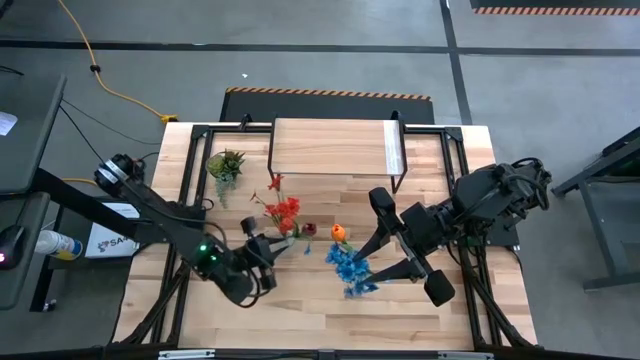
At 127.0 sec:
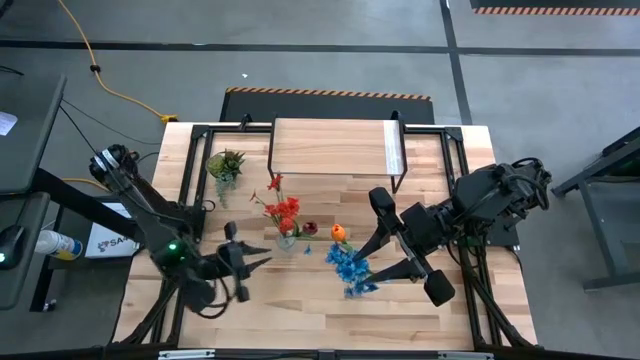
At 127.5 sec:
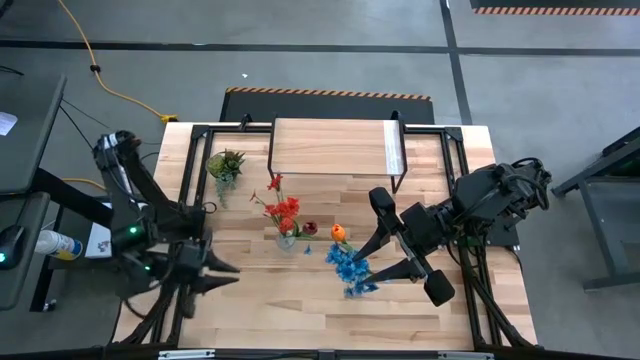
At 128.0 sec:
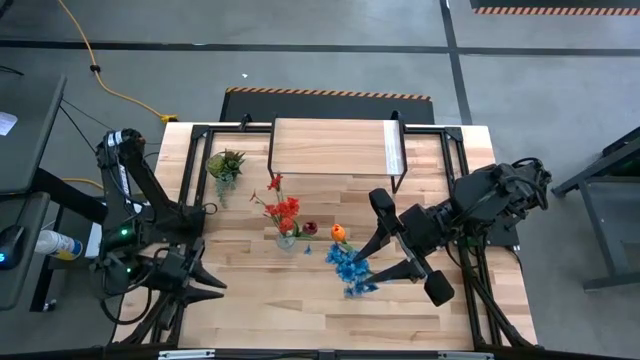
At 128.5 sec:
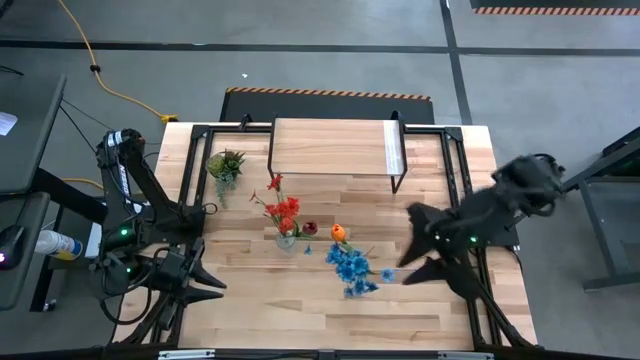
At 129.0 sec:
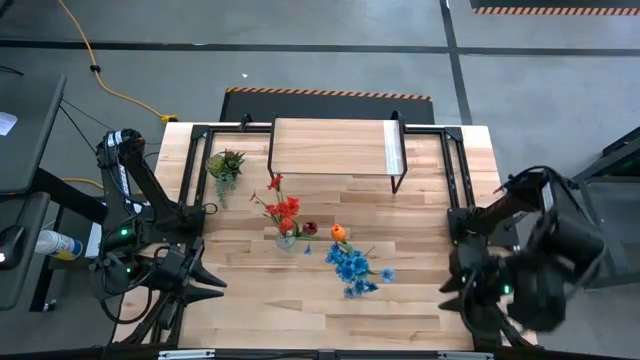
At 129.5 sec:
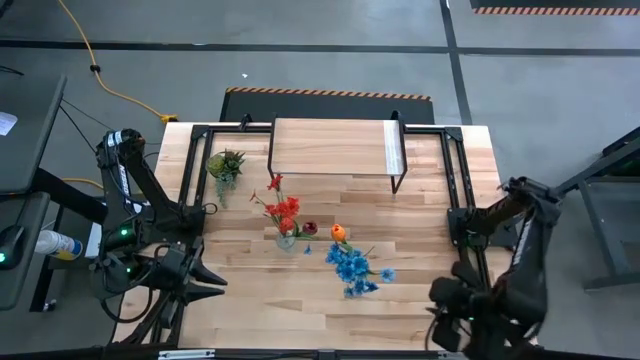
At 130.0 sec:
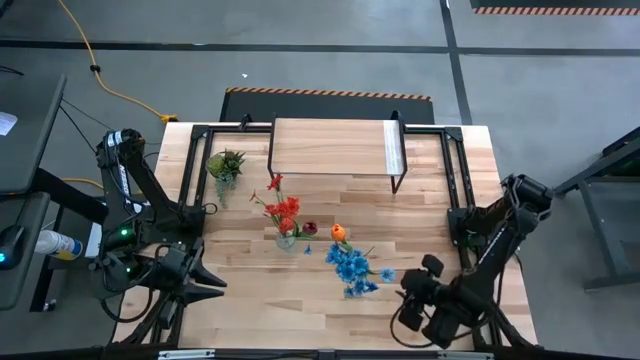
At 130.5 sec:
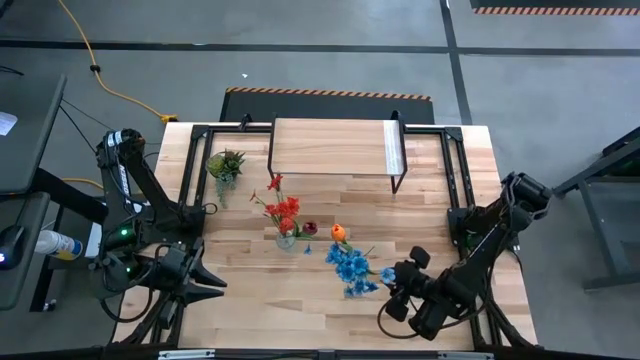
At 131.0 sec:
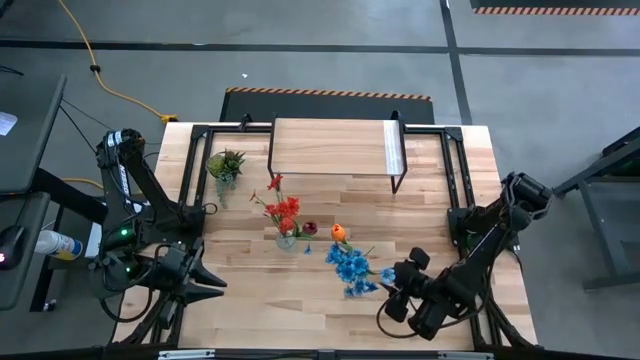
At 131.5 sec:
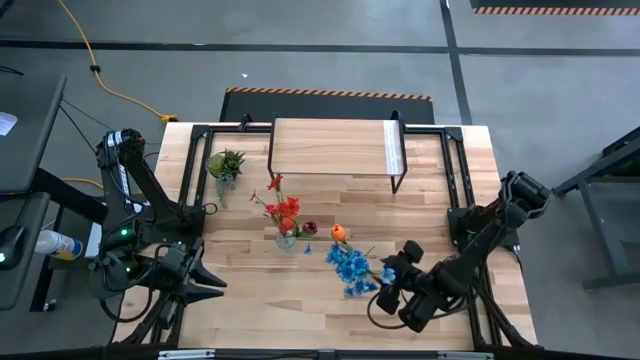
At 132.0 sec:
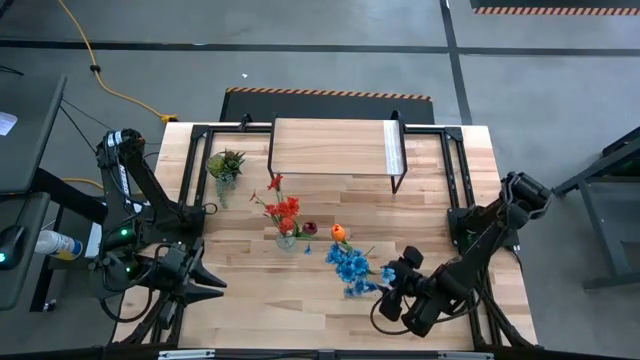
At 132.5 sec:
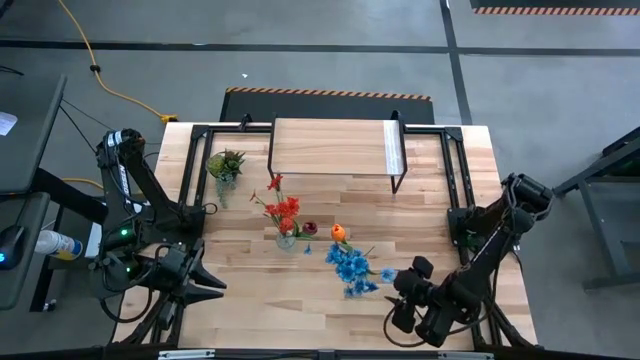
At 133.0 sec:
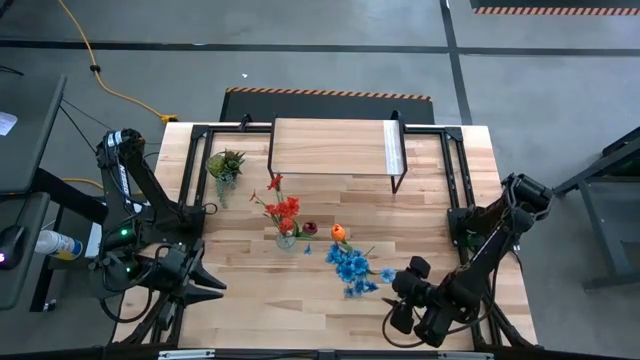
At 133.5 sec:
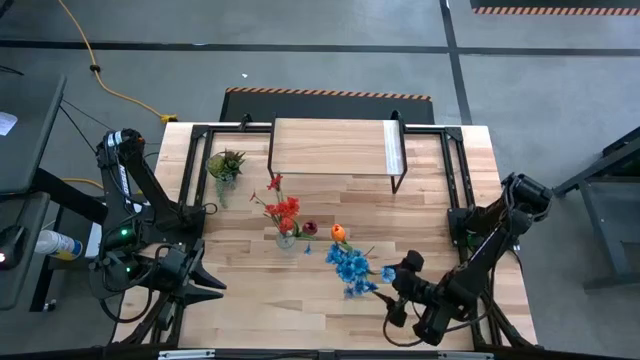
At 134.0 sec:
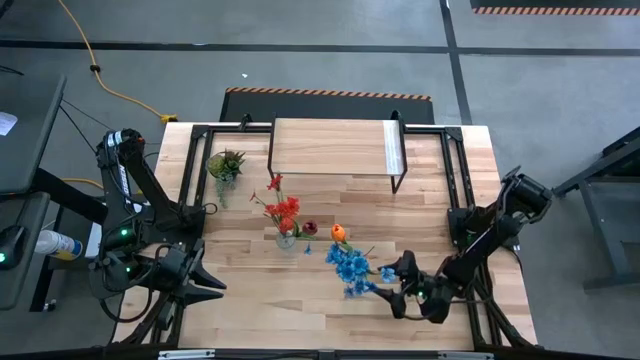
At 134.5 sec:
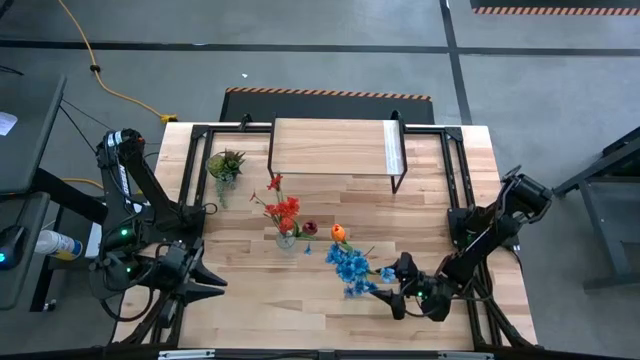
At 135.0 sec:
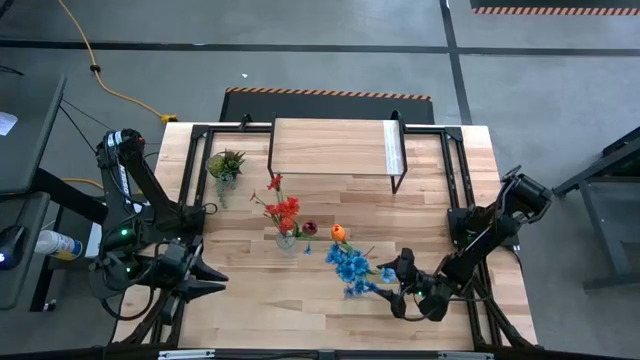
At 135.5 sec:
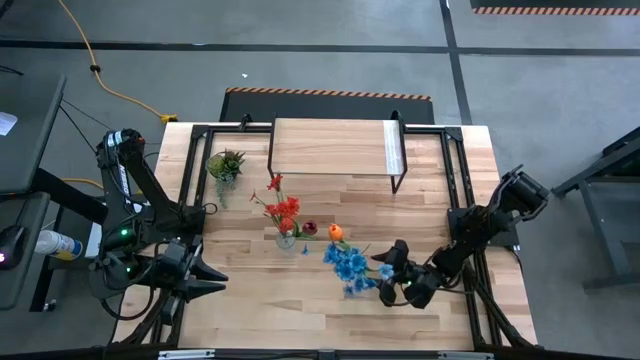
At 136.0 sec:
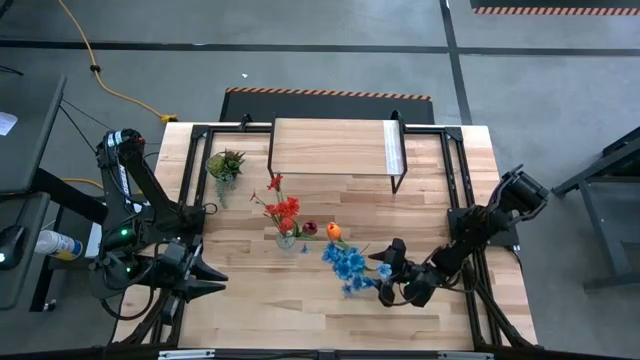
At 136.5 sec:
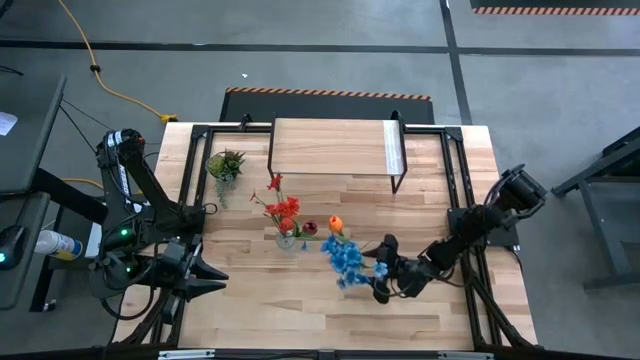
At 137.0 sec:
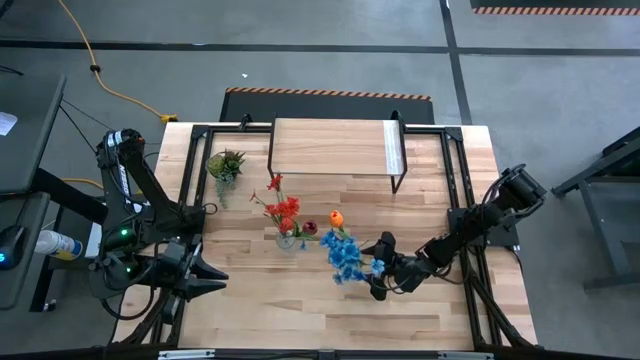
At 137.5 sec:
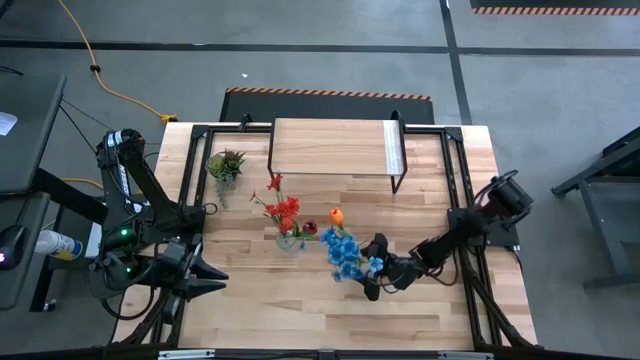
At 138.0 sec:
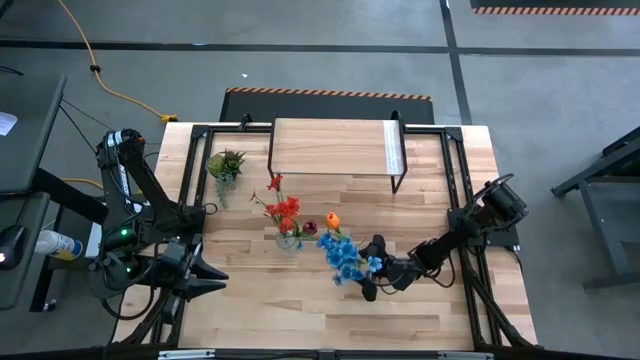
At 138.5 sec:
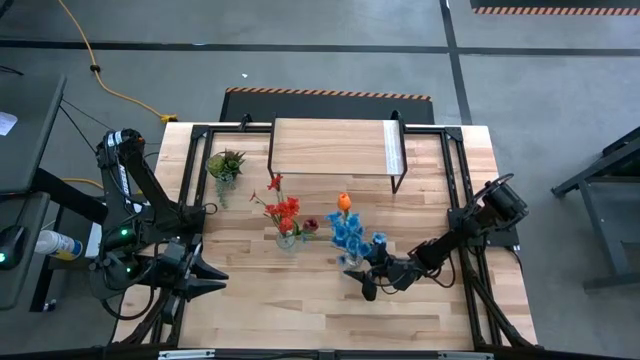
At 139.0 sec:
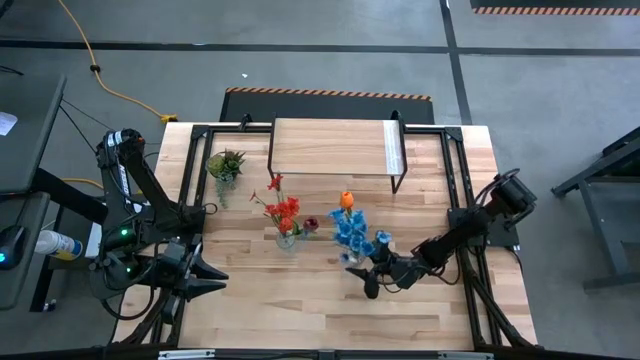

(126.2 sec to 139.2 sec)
Task: Pick and place flowers into a vace then onto a shelf
Put the right transparent vase with flowers on the shelf
